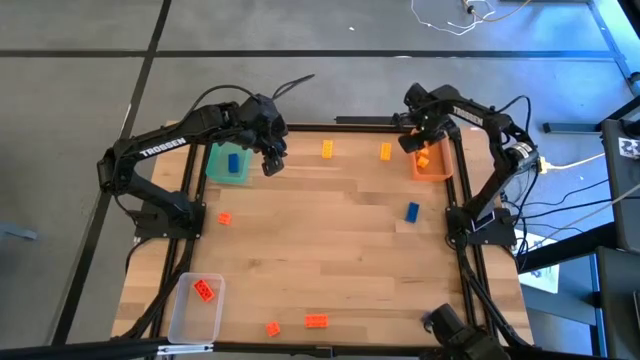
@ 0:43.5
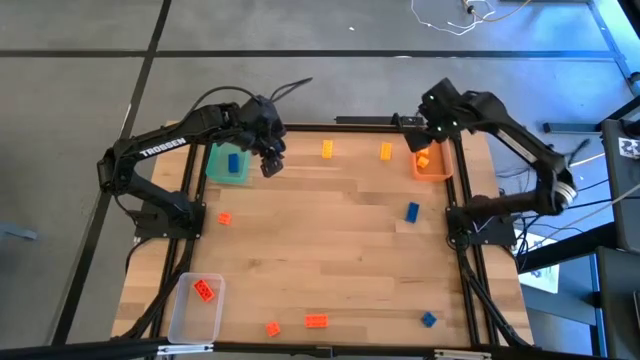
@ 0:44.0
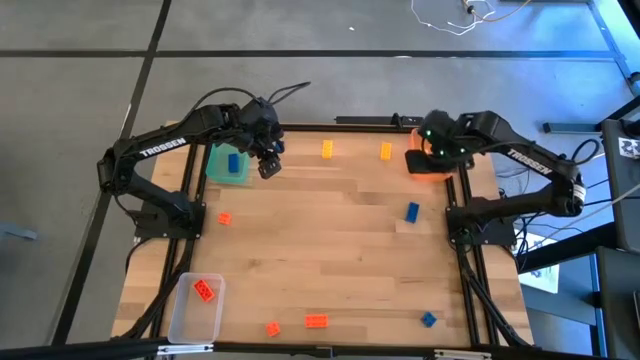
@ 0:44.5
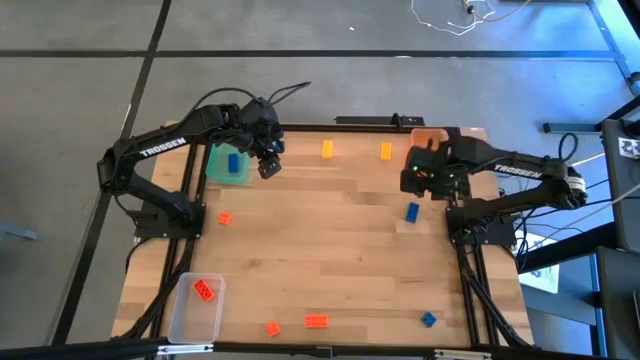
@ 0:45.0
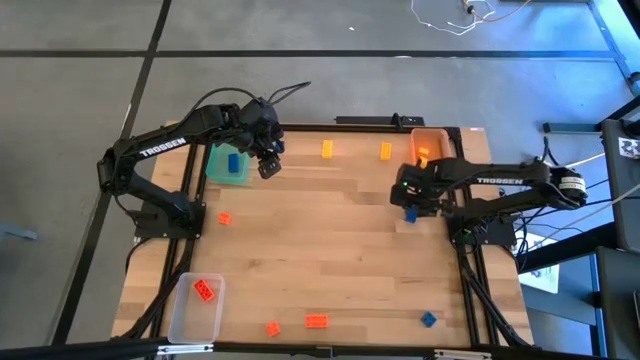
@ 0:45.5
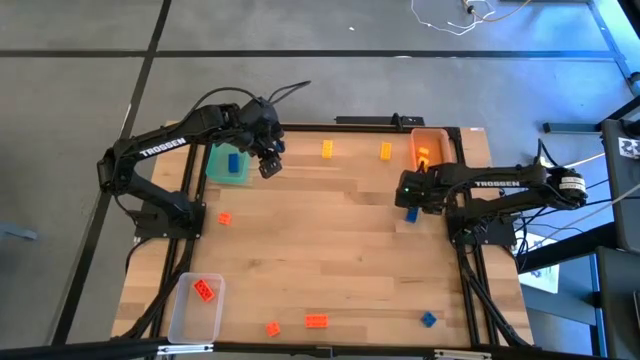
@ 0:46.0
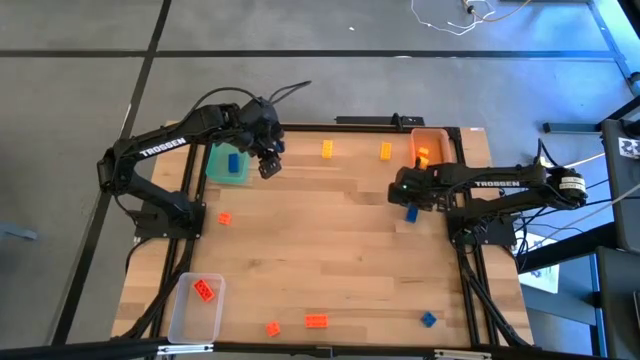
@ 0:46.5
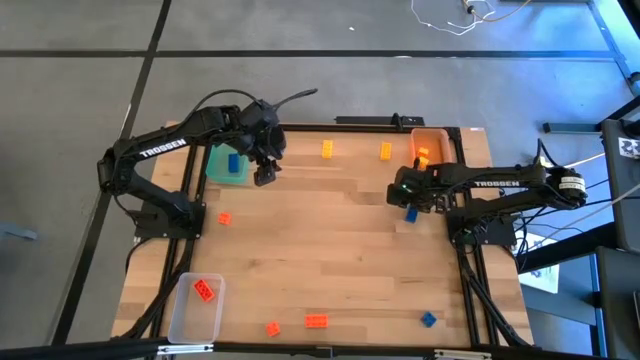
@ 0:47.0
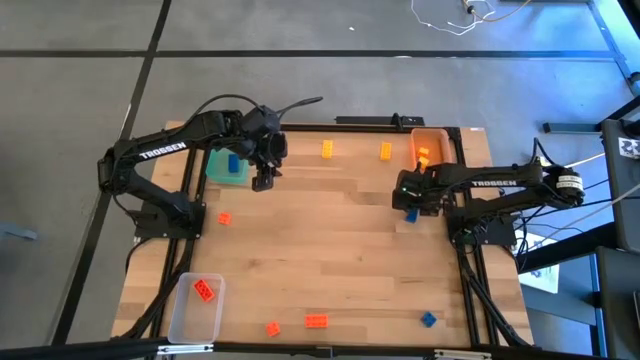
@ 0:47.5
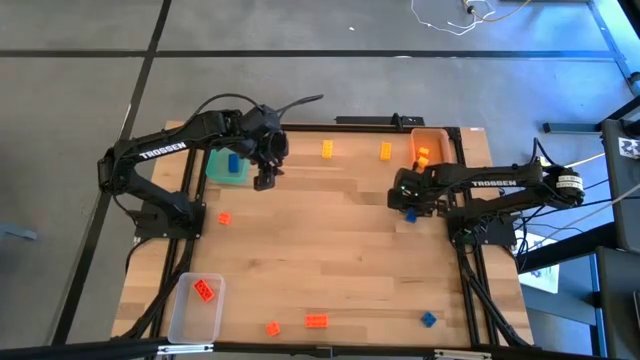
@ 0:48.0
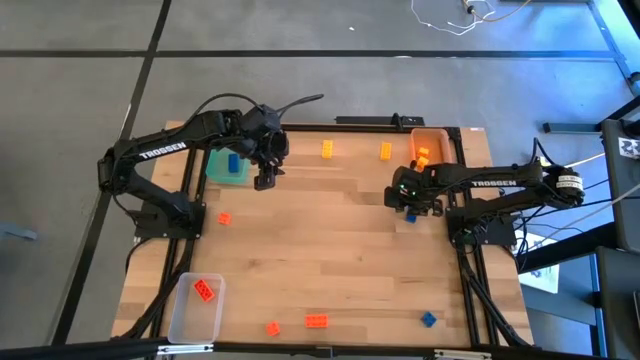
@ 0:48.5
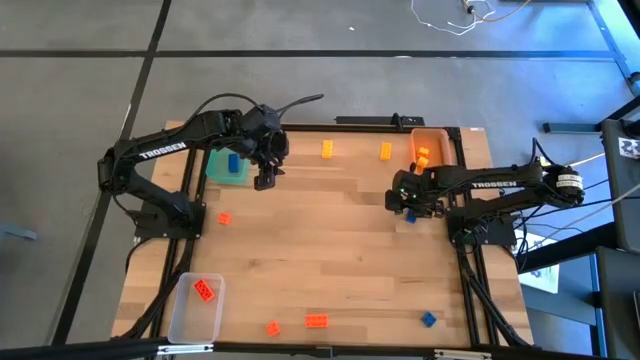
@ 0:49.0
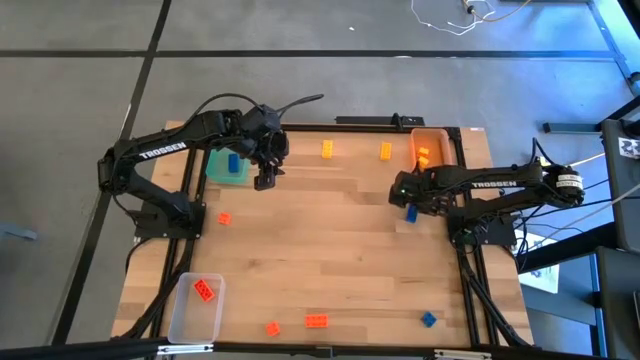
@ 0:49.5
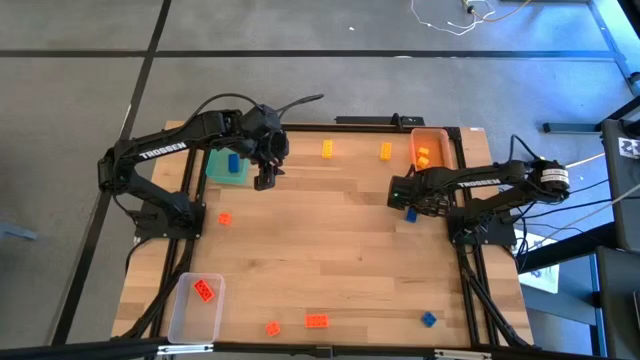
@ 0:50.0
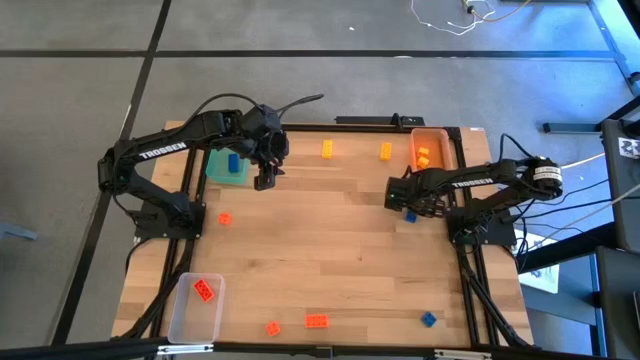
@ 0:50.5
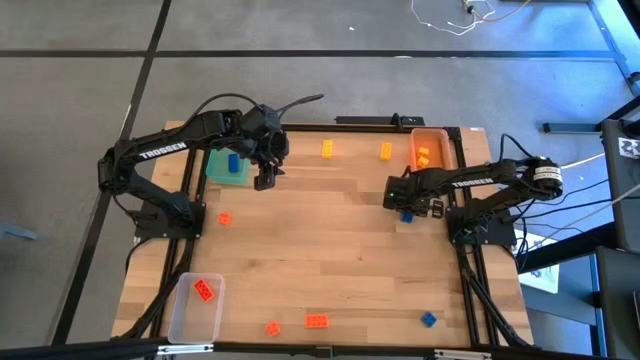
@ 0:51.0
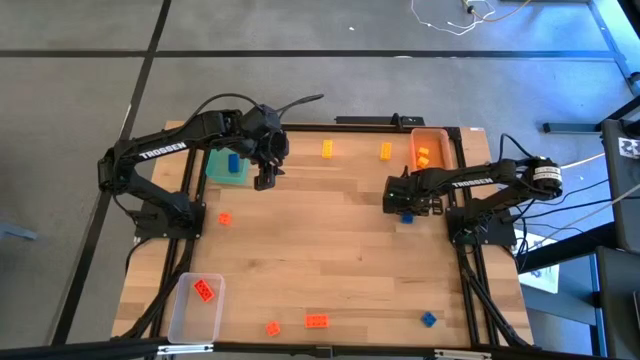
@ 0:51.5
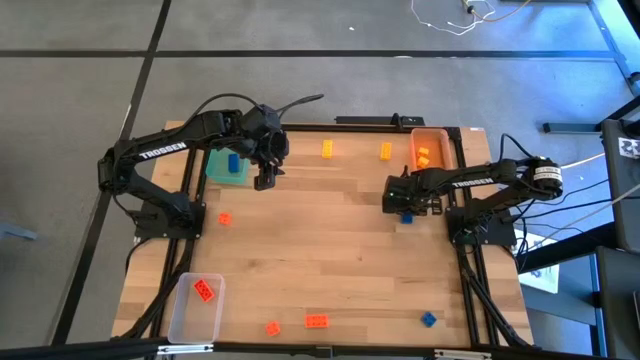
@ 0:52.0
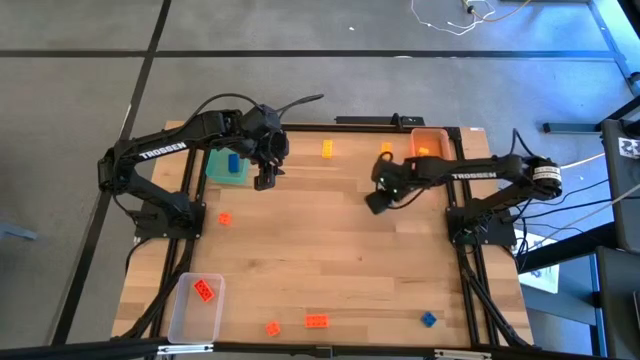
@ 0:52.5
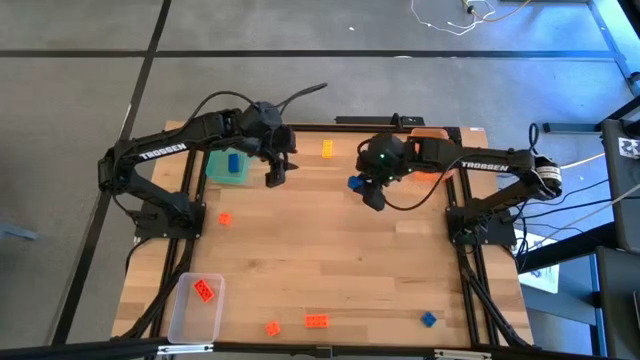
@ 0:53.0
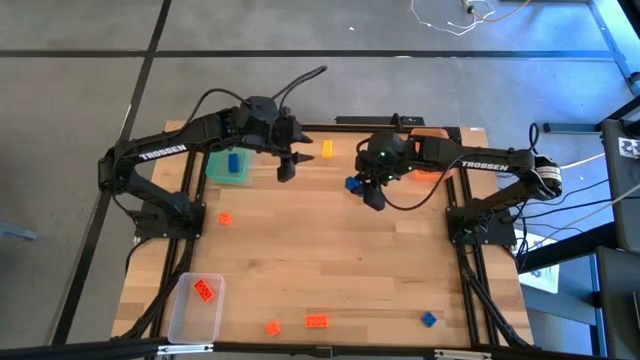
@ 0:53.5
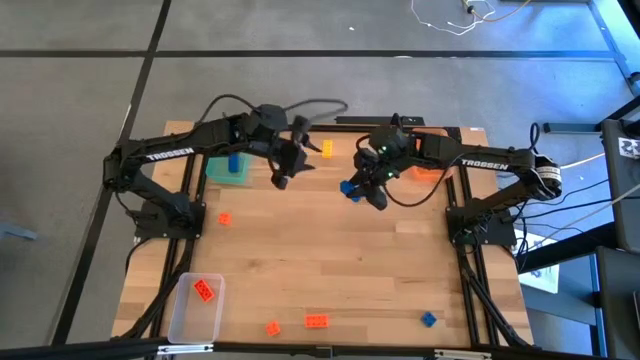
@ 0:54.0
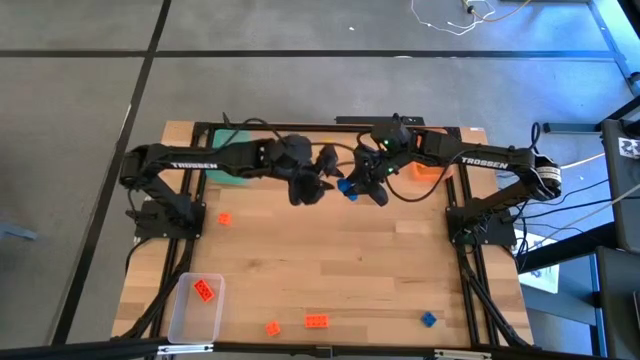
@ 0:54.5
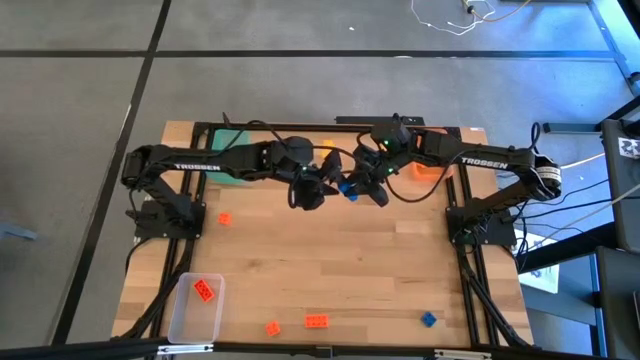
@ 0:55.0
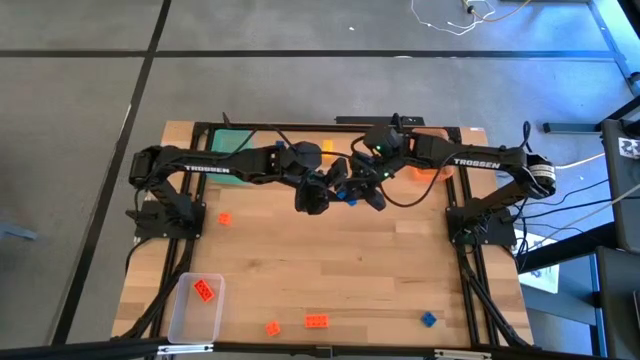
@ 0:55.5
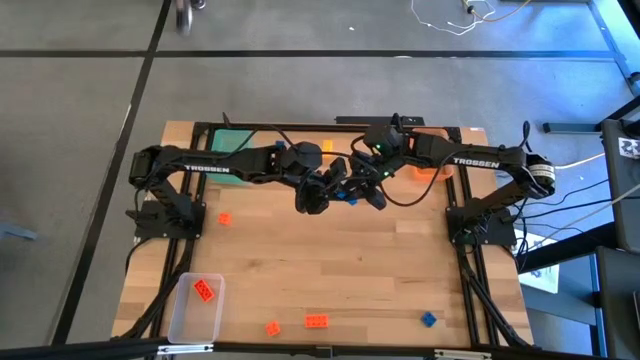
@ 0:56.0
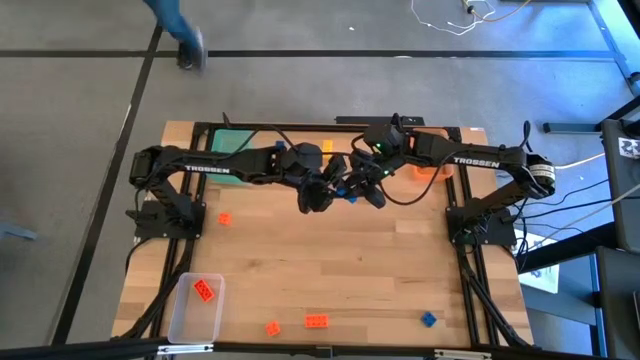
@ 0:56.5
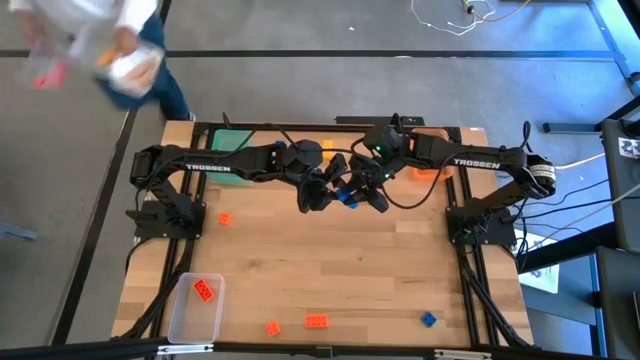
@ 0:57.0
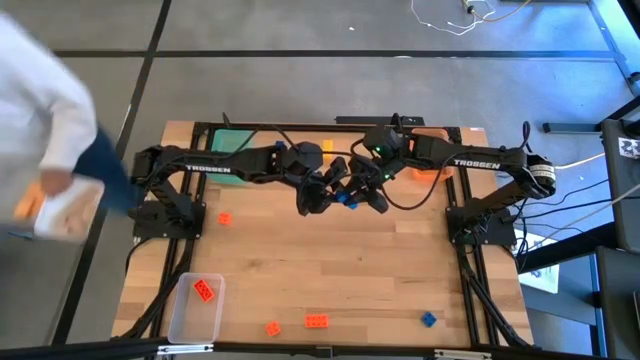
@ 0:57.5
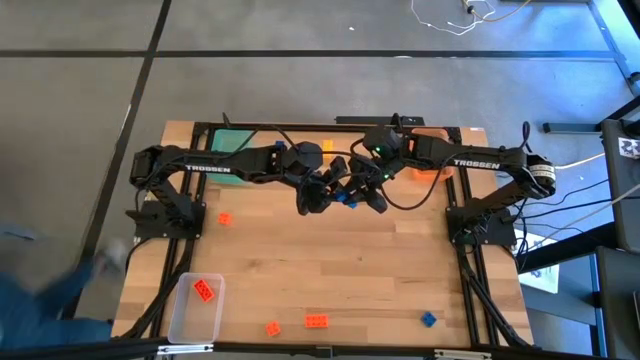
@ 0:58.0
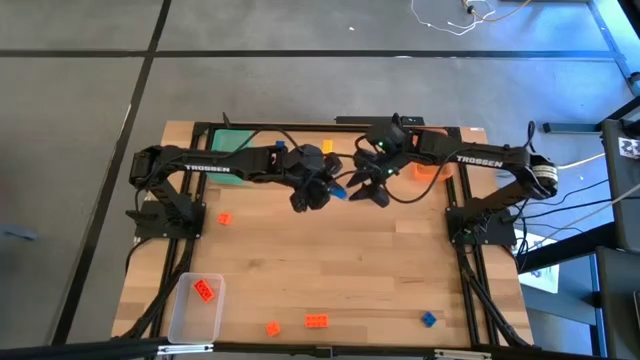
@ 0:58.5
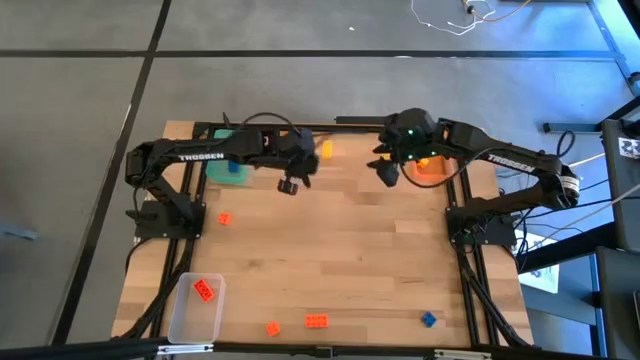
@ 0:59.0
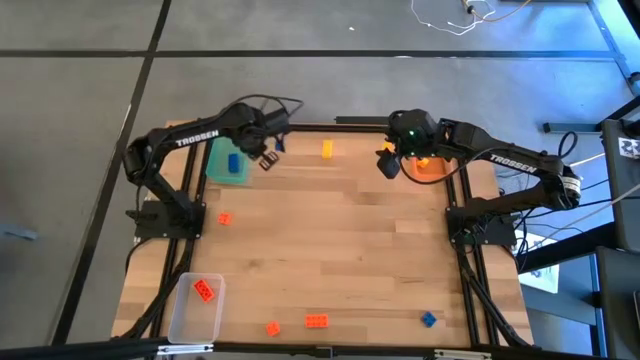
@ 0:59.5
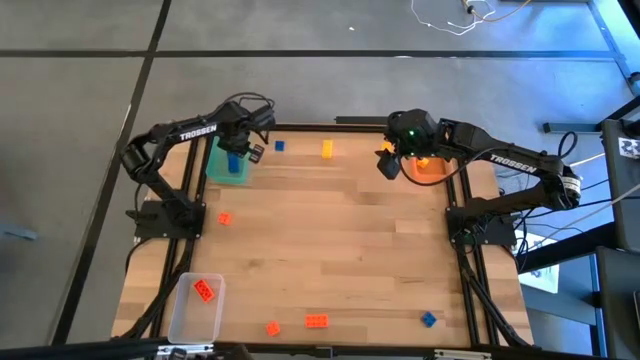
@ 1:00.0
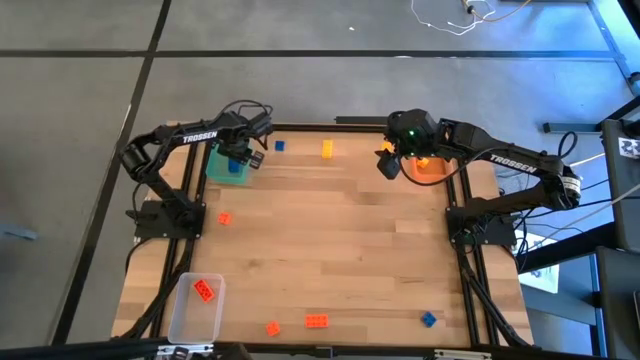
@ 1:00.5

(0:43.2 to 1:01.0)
Task: Sort & place blocks by color
Put the blue game piece into the blue bin

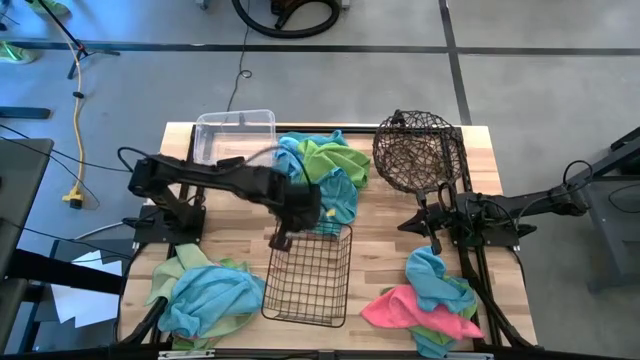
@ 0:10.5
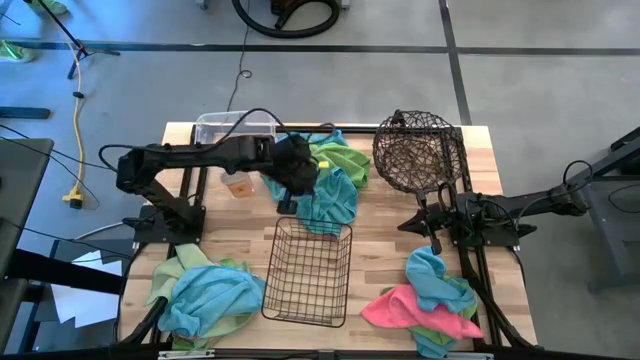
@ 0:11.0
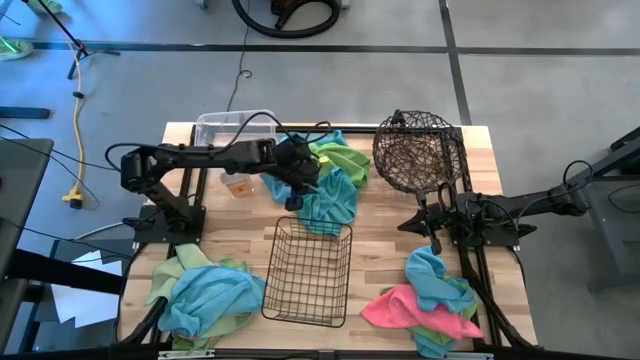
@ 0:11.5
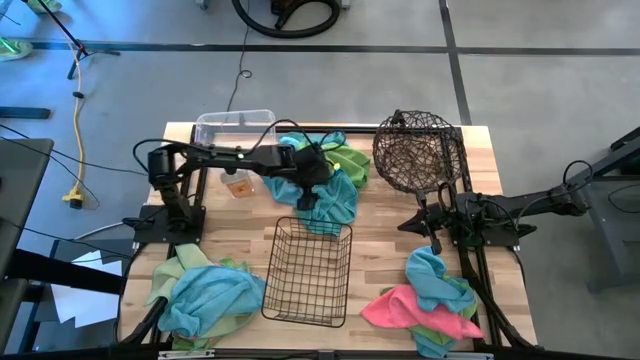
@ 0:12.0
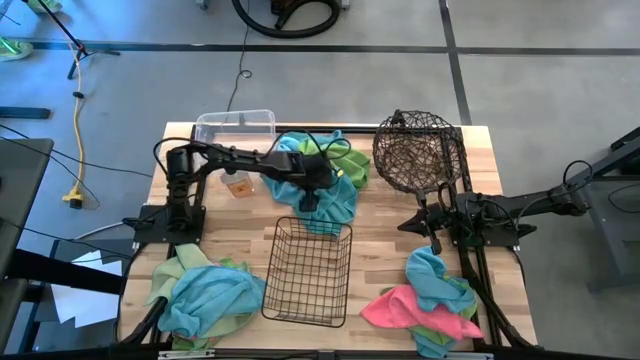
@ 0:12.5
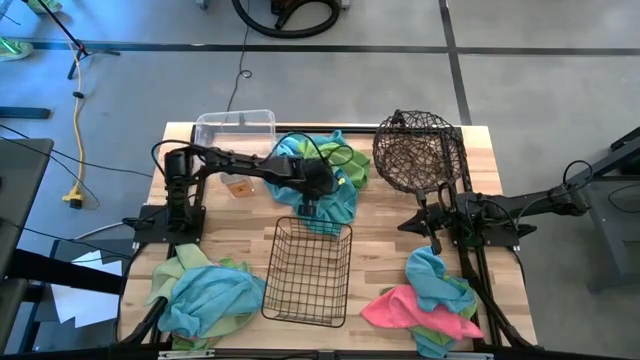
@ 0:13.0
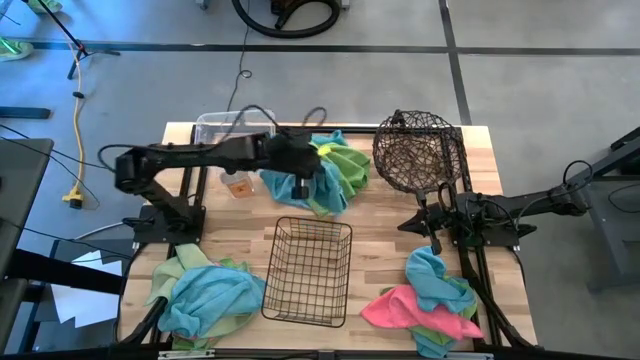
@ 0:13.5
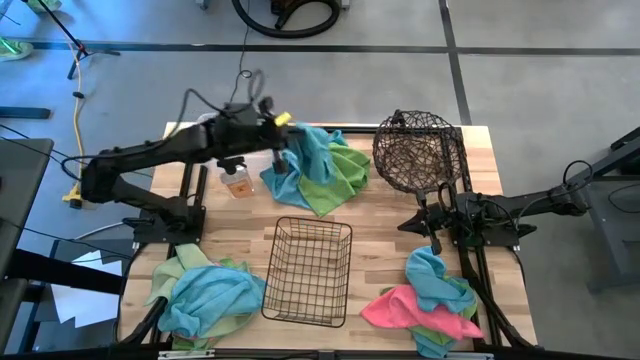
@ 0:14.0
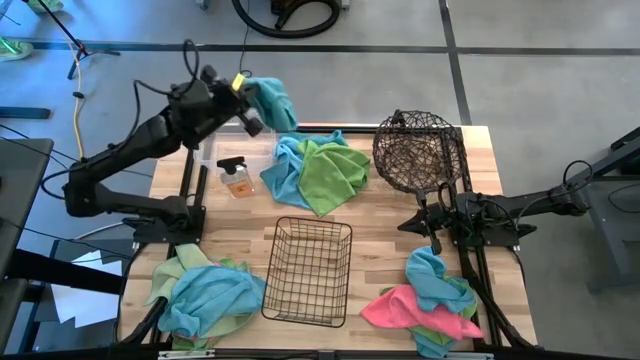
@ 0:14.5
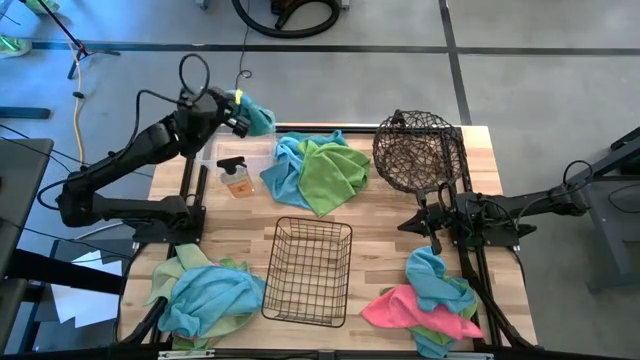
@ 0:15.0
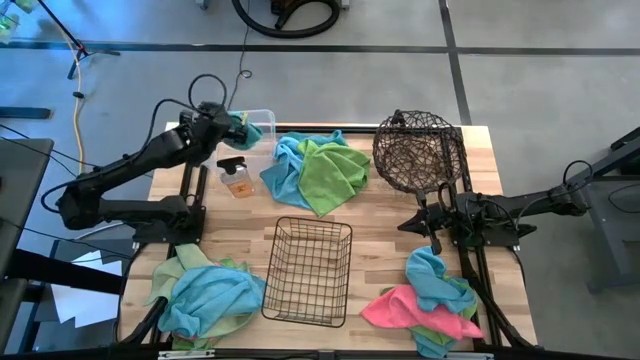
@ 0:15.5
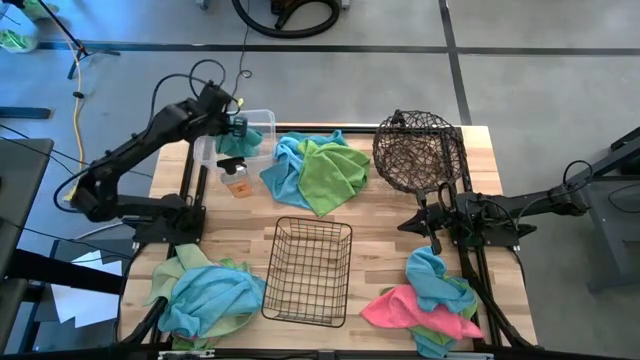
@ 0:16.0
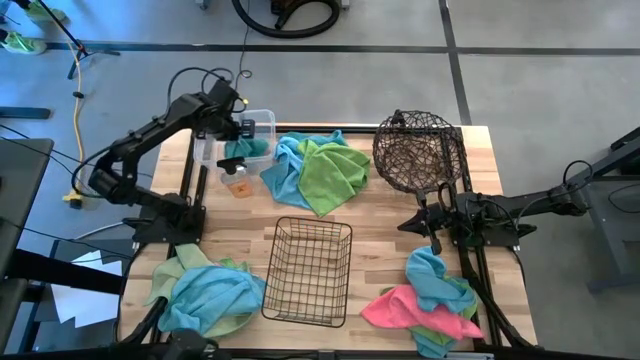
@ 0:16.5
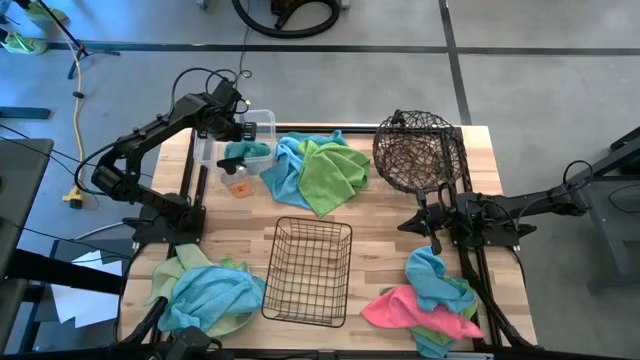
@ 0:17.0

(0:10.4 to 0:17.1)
Task: Sort microfiber towel by color & place in baskets
Put the blue microfiber towel into the transparent bin
